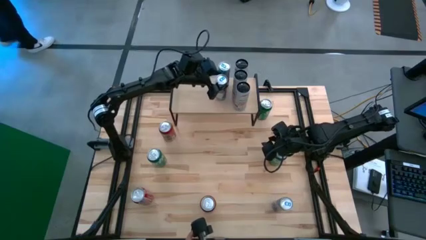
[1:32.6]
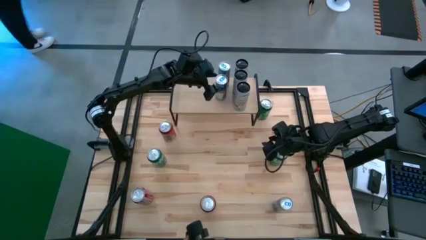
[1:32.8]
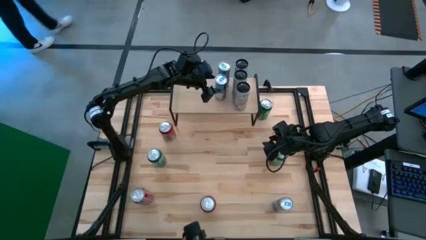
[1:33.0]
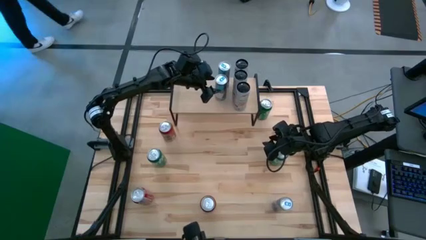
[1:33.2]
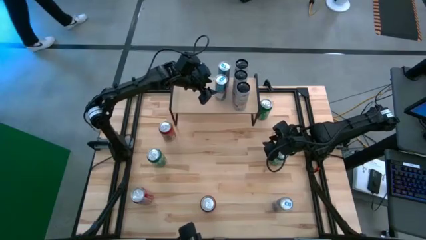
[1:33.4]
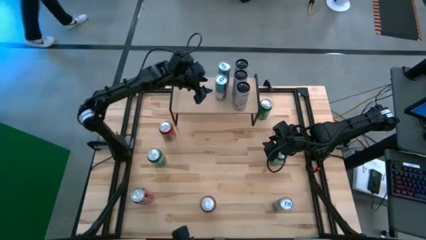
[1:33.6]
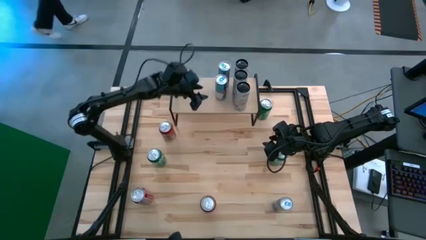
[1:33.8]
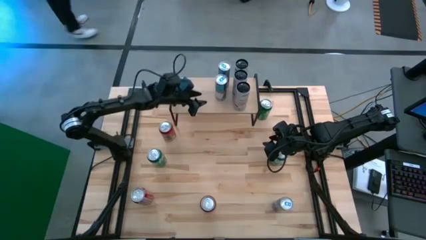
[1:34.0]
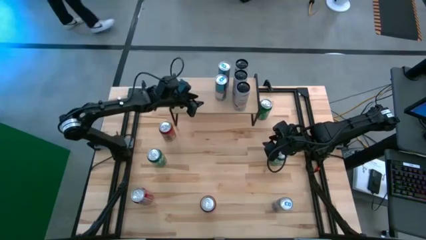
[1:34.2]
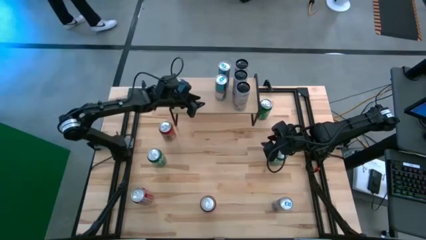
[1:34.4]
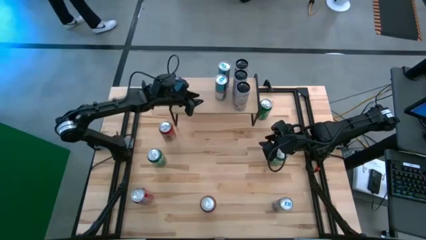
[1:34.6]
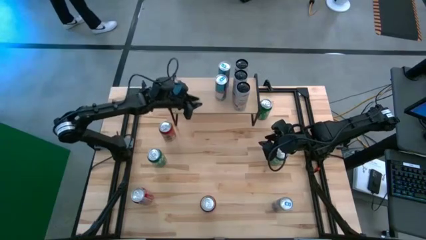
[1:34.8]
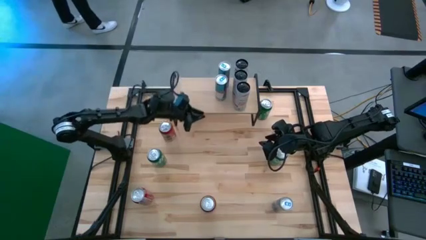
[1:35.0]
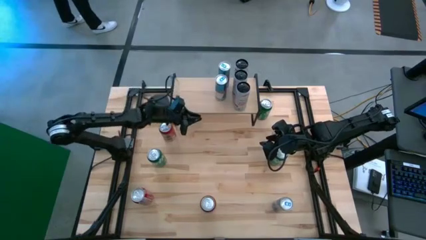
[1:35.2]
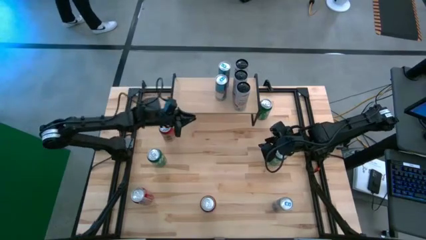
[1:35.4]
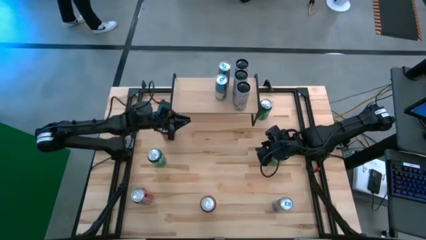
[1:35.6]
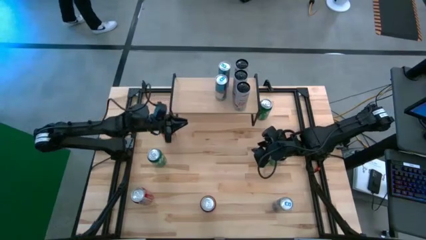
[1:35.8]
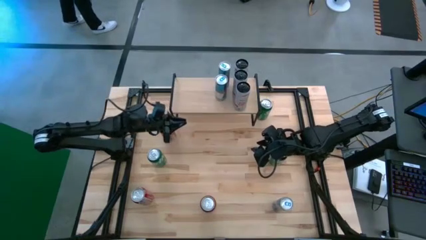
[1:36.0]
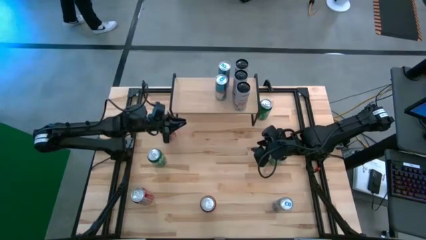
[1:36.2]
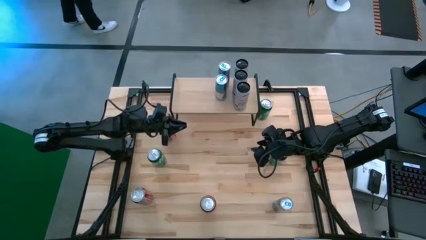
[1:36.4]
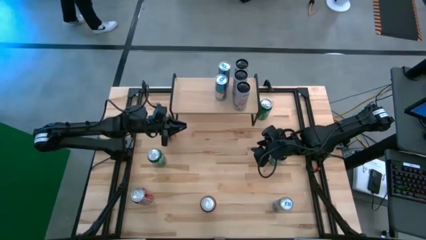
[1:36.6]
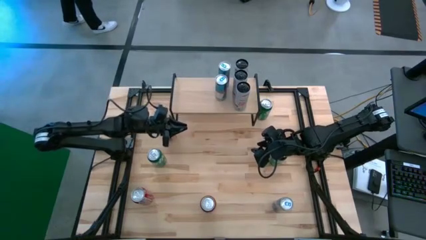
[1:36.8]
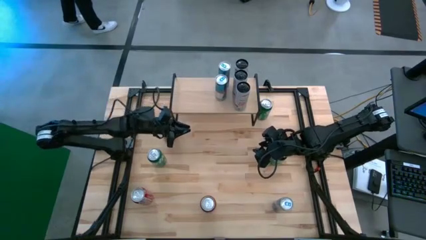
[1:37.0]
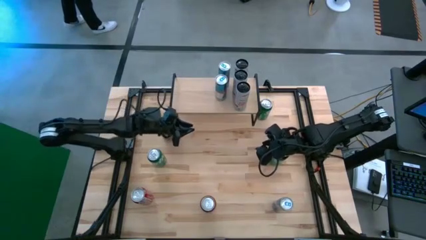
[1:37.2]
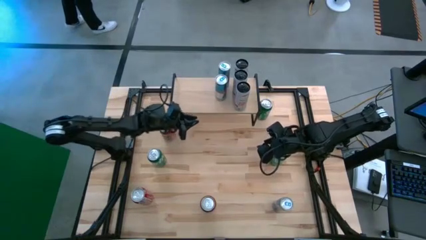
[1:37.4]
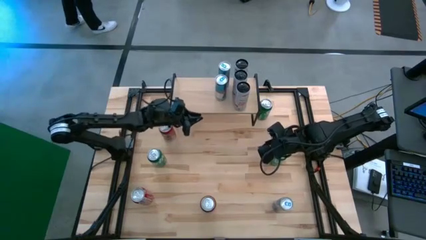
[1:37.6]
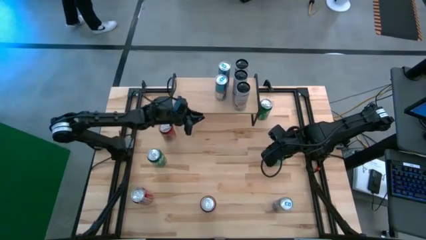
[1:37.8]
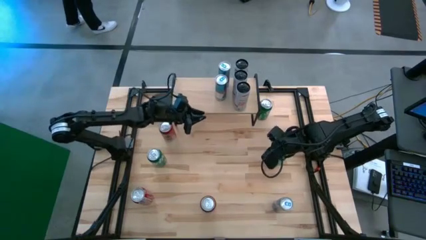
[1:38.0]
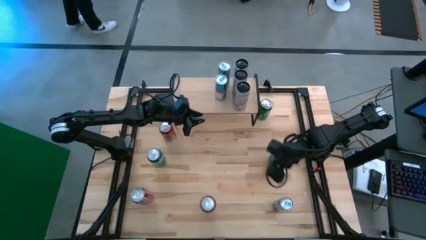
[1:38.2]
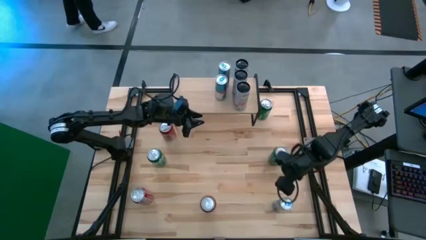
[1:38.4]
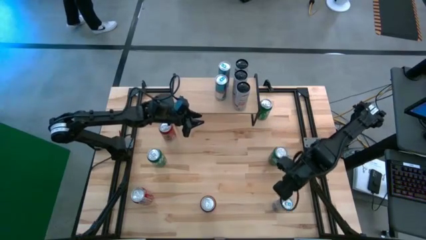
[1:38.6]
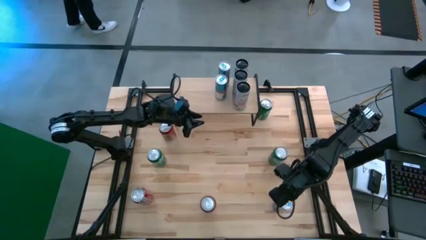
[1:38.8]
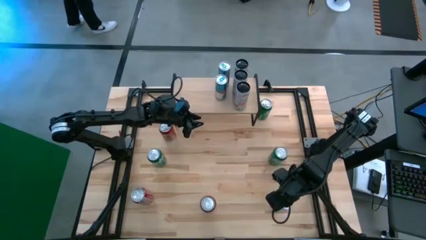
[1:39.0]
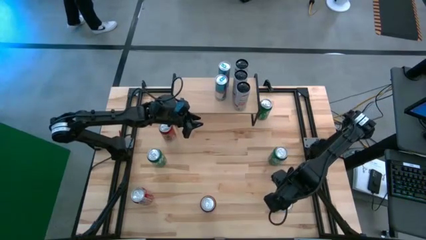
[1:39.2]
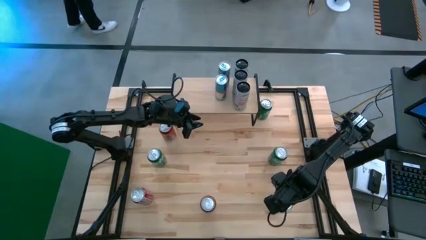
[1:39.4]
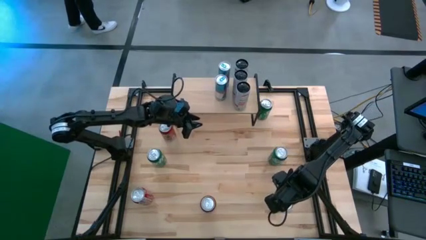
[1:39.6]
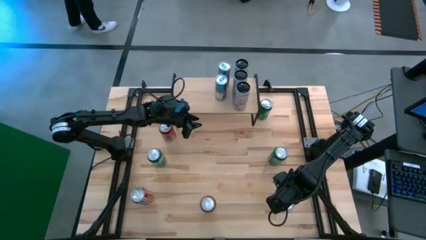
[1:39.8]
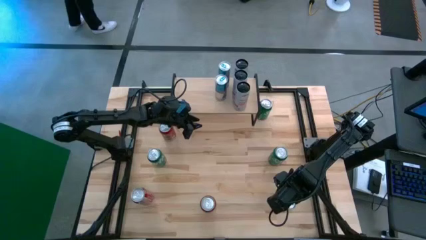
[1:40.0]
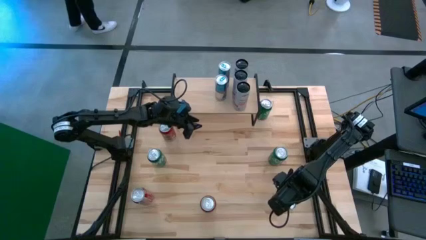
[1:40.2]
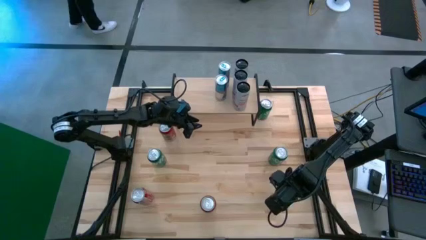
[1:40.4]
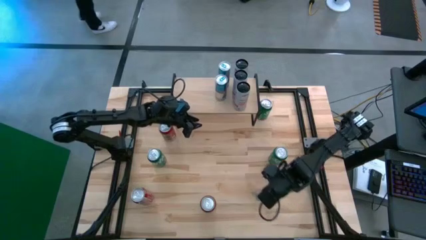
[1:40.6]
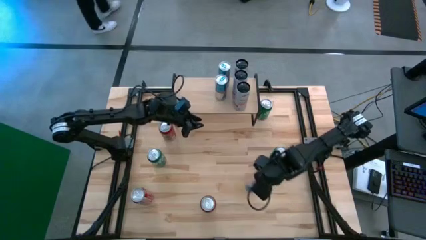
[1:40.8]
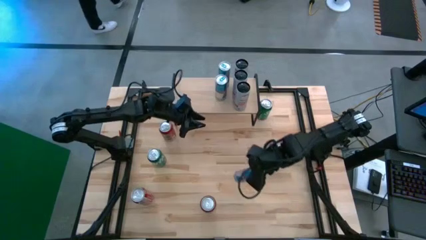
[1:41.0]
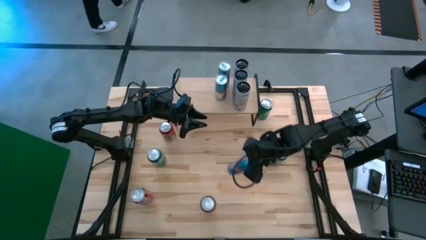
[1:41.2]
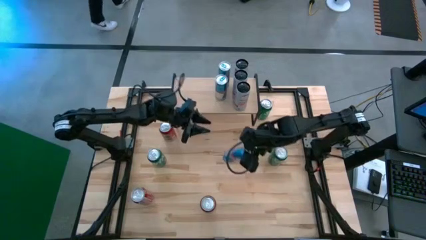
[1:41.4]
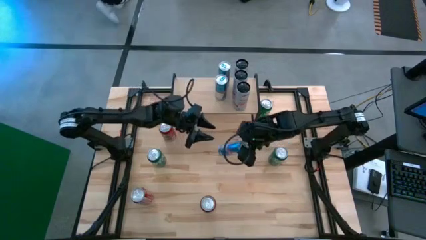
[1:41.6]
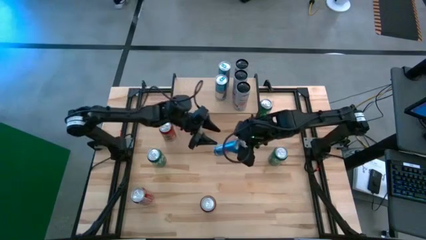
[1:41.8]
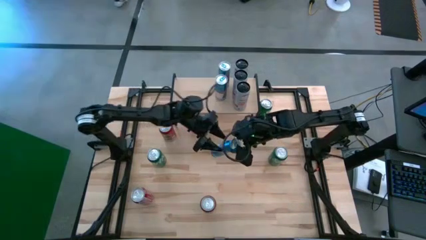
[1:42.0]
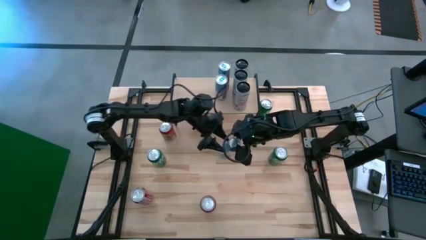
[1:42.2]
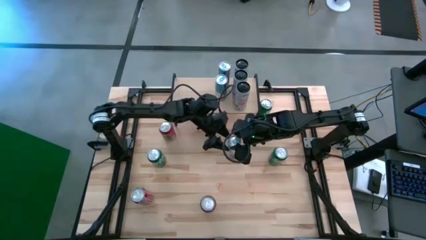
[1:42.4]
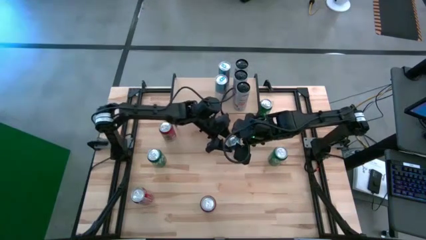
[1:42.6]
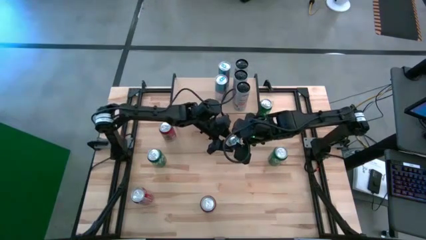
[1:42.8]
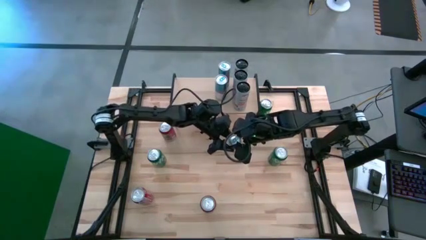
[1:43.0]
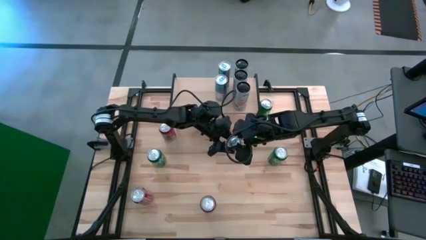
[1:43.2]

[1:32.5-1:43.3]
Task: Place canned beverage on shelf
Put the blue soda can on the shelf aligned with the other blue soda can
